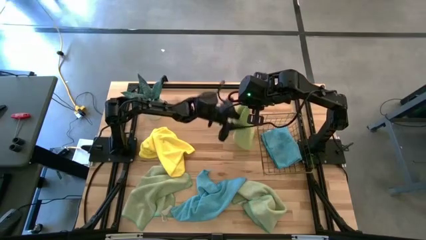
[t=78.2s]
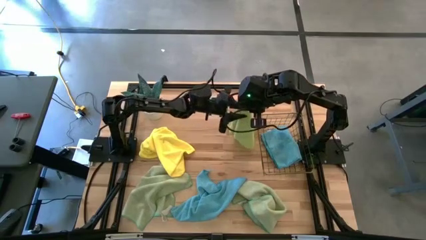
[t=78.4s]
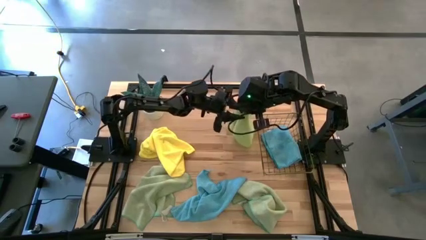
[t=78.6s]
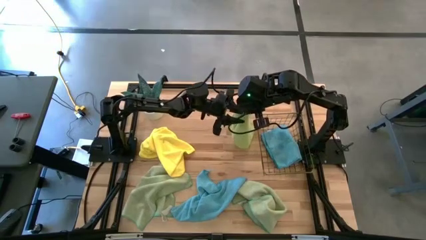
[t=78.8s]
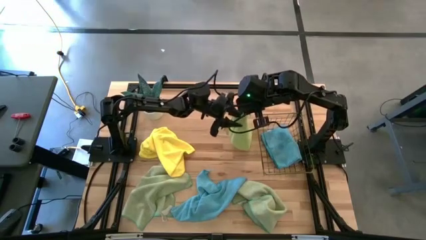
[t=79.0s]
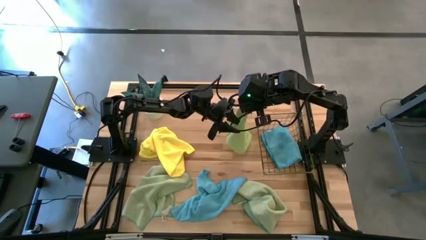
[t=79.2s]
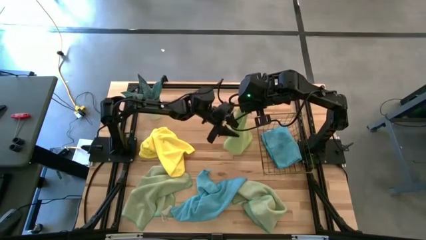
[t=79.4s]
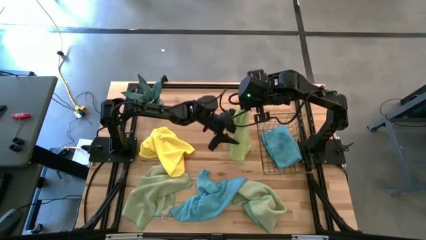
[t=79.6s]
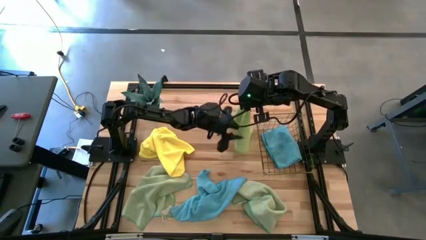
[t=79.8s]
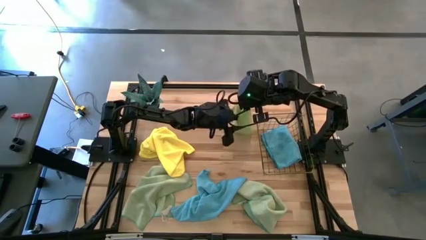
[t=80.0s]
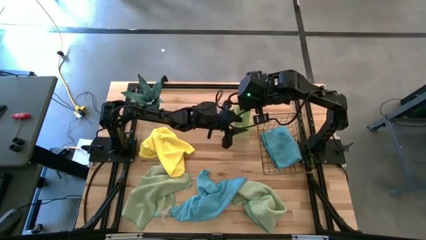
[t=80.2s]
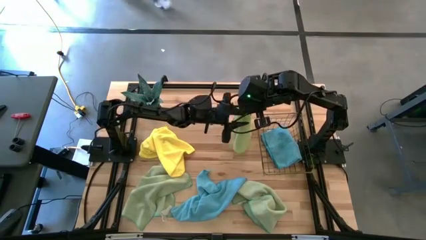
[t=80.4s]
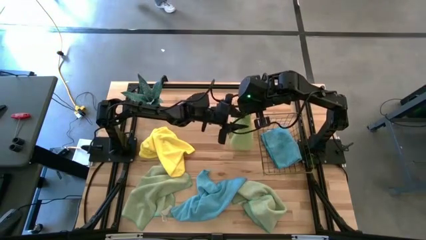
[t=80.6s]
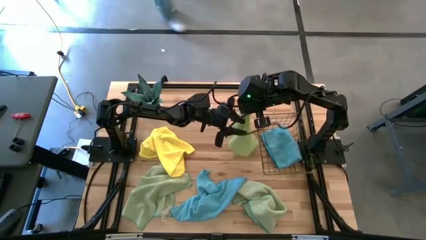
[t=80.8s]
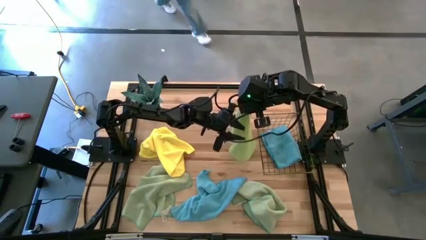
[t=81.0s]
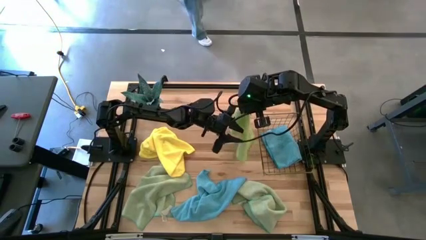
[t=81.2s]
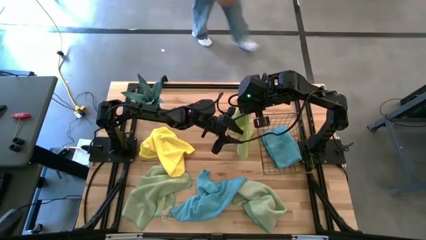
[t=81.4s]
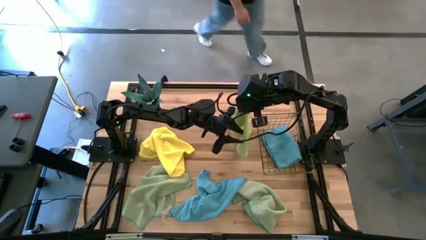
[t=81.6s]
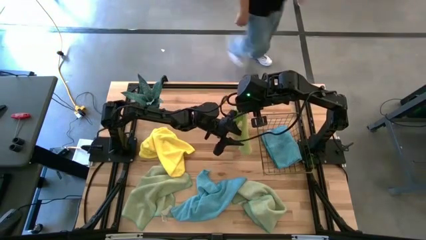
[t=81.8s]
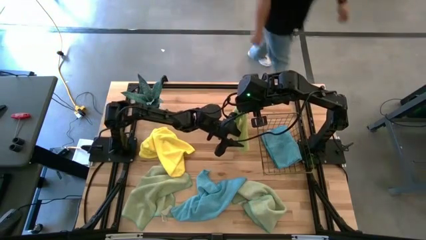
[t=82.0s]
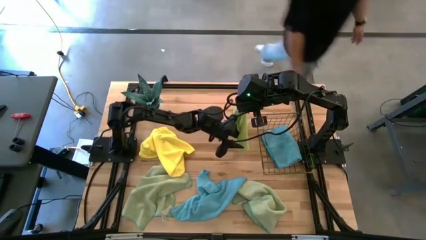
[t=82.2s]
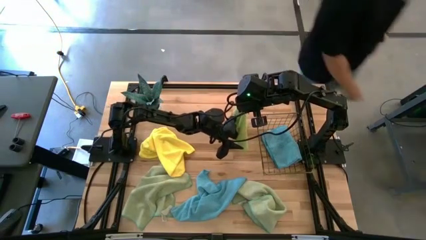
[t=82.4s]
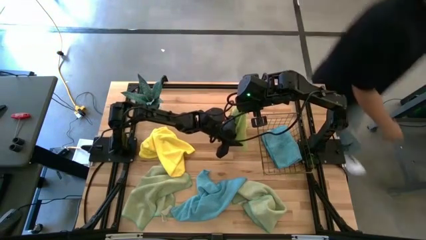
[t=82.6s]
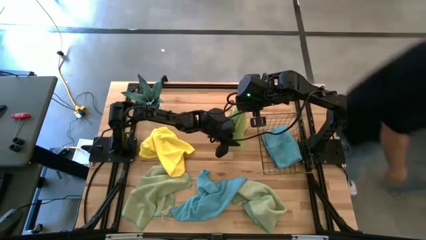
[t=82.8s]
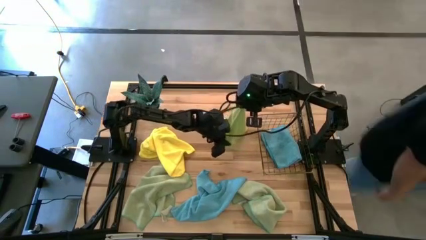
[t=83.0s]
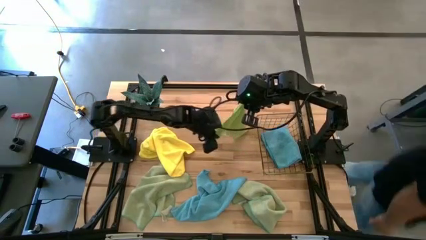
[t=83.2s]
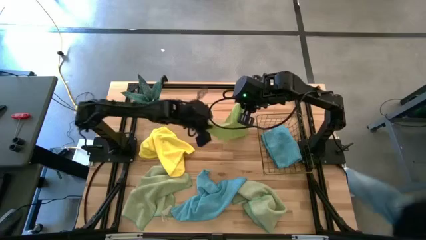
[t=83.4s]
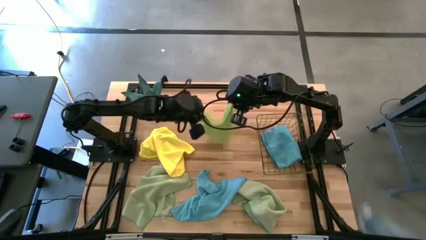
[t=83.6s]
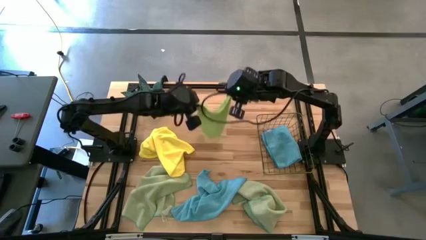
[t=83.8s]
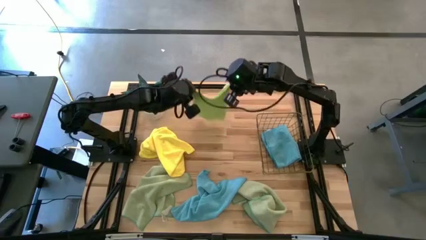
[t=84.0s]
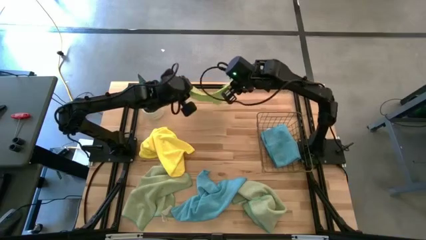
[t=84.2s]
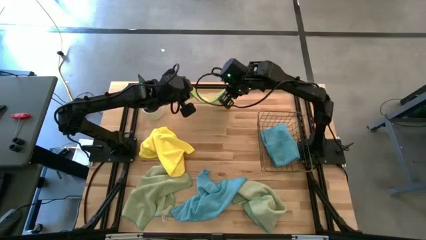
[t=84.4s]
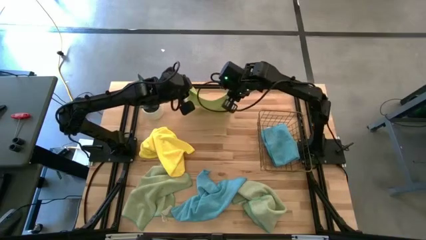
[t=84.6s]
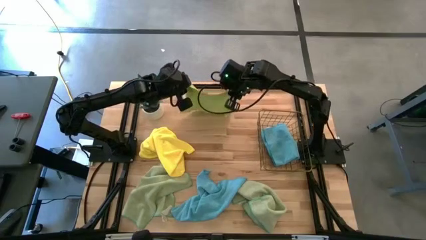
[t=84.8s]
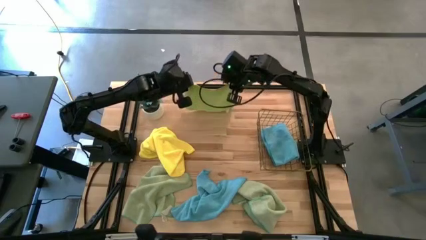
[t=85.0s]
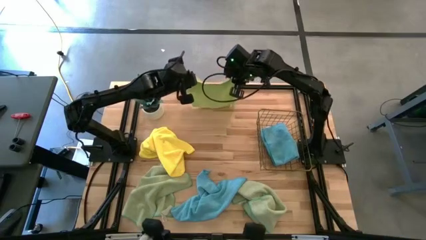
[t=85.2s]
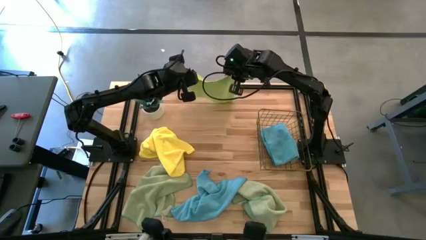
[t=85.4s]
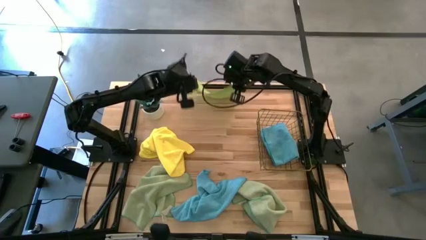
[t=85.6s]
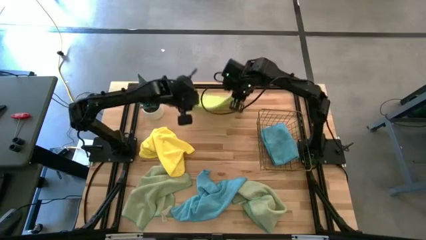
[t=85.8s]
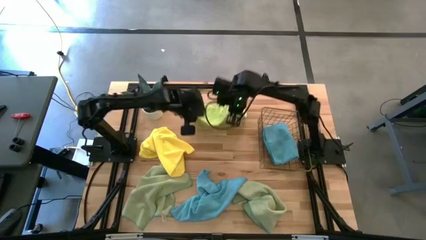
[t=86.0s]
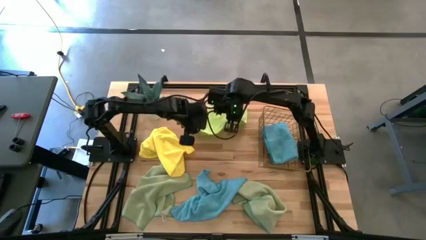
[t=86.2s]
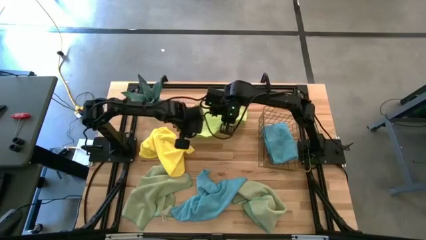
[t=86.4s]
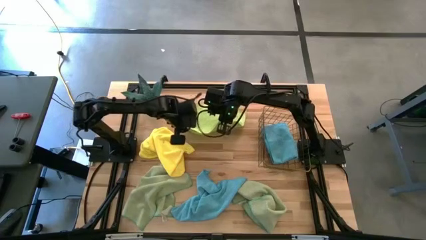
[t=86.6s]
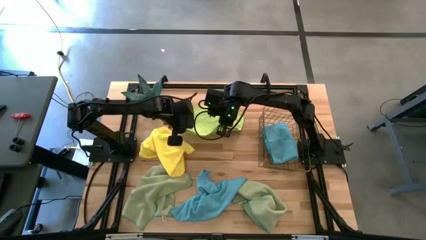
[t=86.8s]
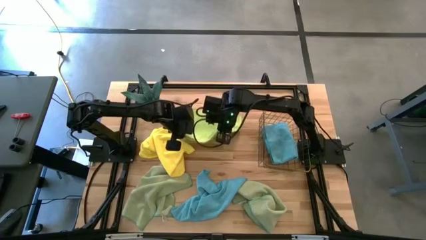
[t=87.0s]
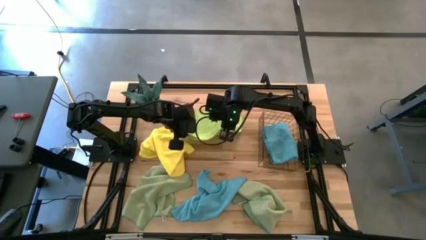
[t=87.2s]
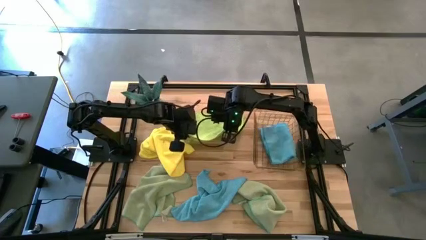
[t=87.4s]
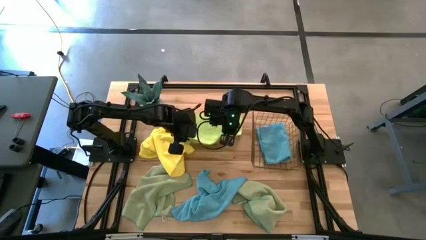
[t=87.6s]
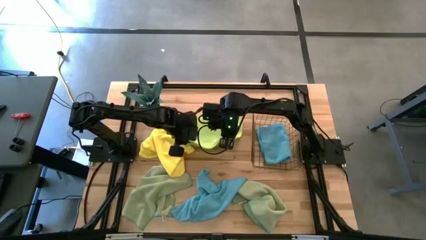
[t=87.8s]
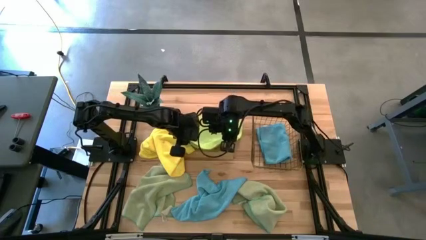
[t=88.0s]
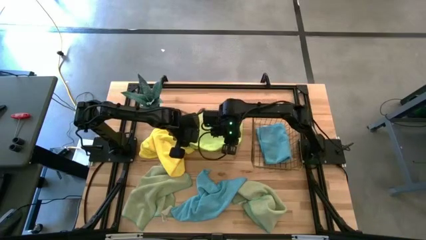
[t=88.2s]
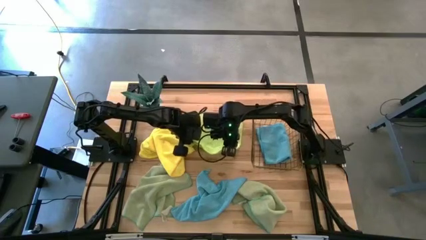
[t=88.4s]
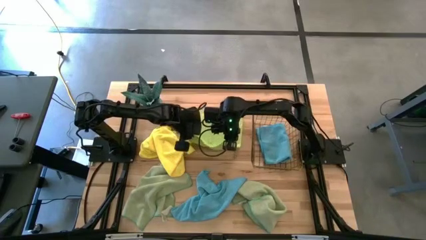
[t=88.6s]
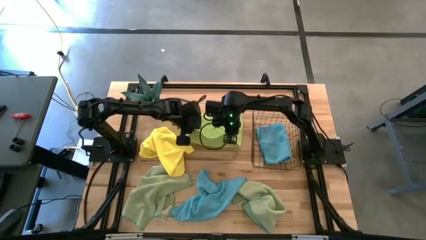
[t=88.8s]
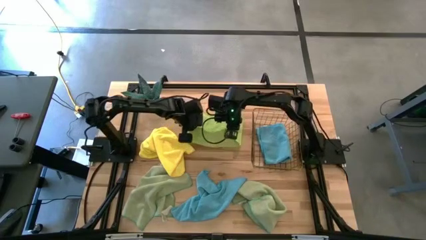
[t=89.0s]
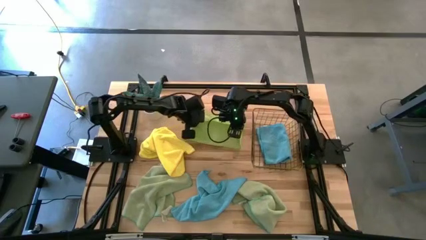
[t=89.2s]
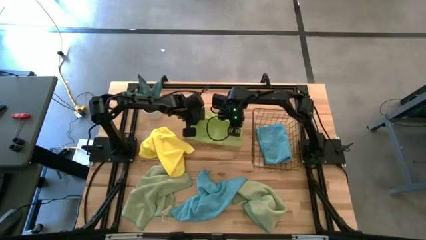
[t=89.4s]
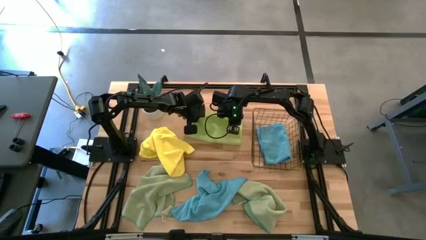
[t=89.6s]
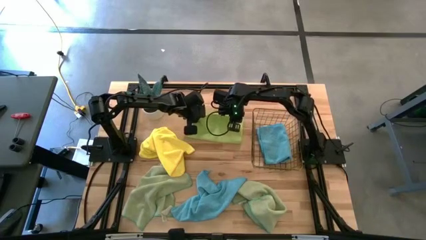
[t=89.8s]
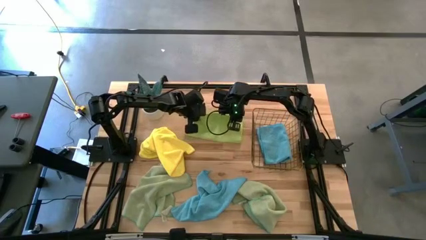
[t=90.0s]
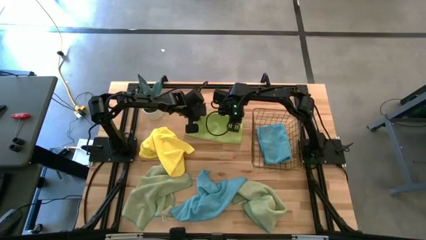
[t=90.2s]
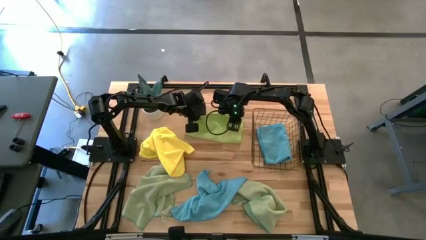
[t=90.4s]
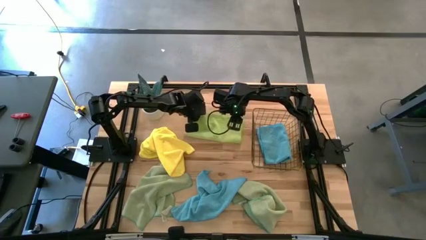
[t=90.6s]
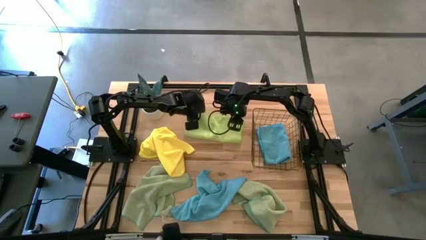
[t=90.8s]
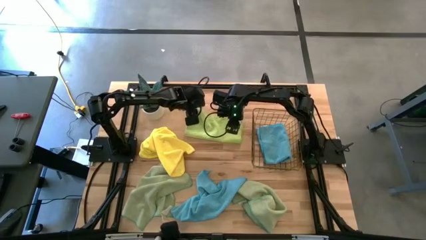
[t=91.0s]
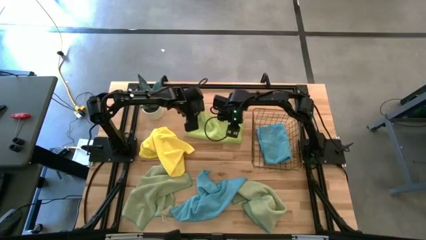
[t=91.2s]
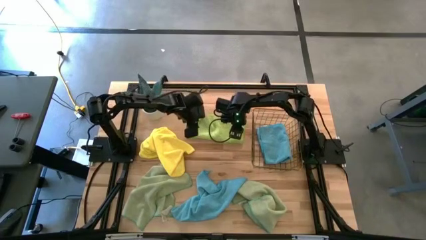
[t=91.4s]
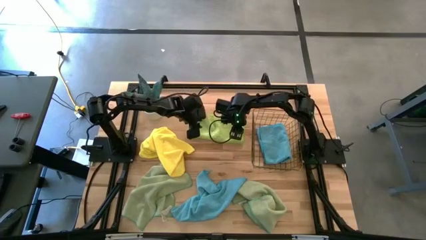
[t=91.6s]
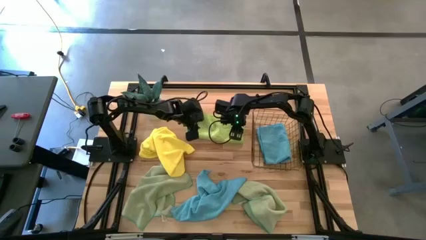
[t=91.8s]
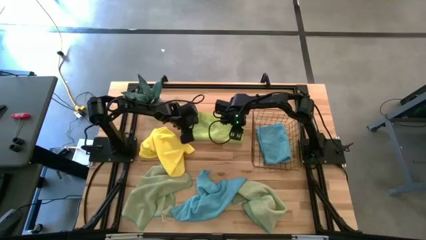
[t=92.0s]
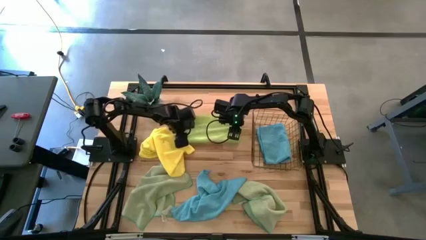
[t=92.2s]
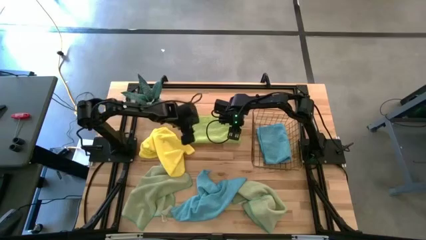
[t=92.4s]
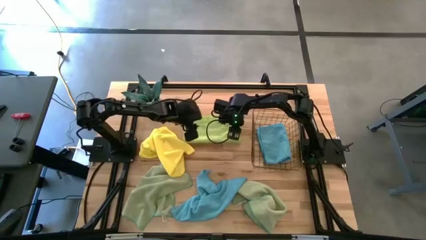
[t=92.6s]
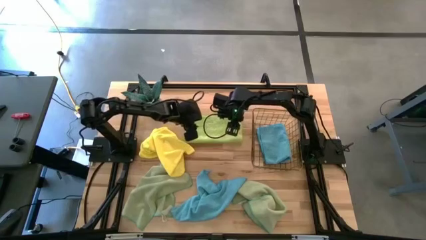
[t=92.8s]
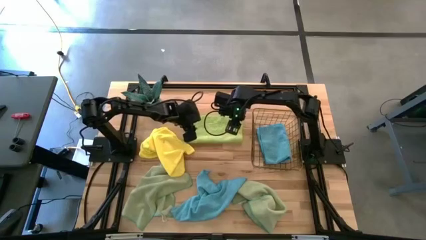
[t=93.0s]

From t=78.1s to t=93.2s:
Task: Fold microfiber towels
Fold the light green microfiber cloth
